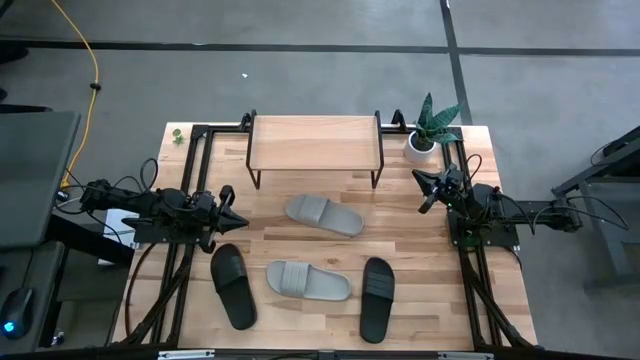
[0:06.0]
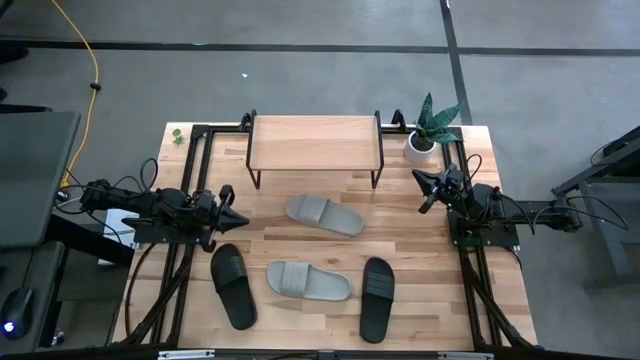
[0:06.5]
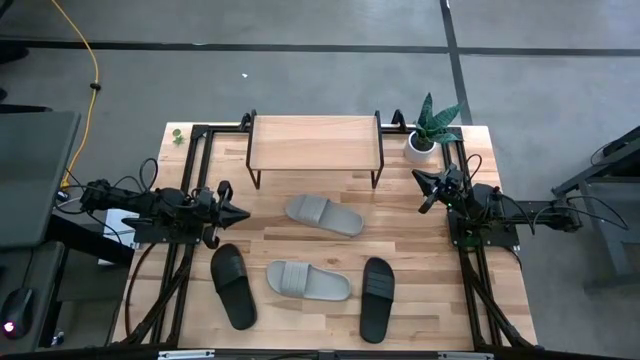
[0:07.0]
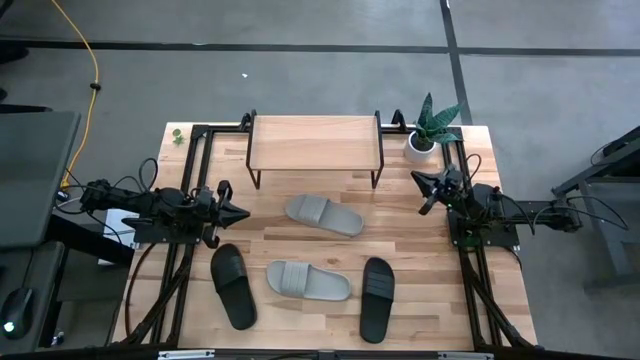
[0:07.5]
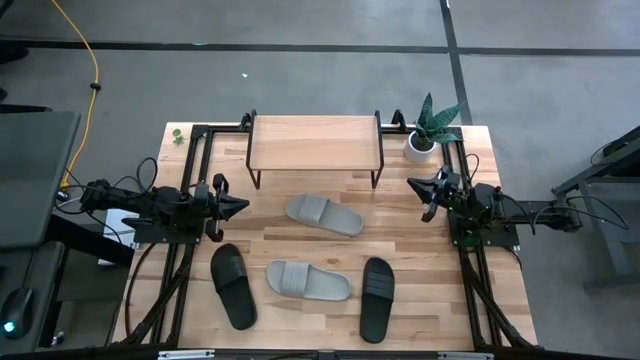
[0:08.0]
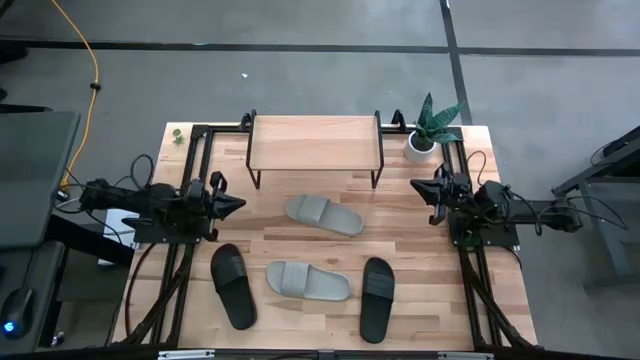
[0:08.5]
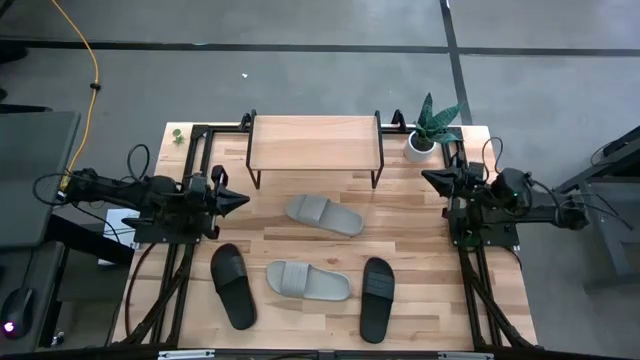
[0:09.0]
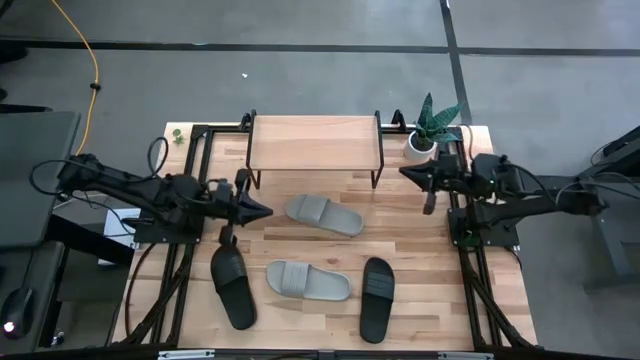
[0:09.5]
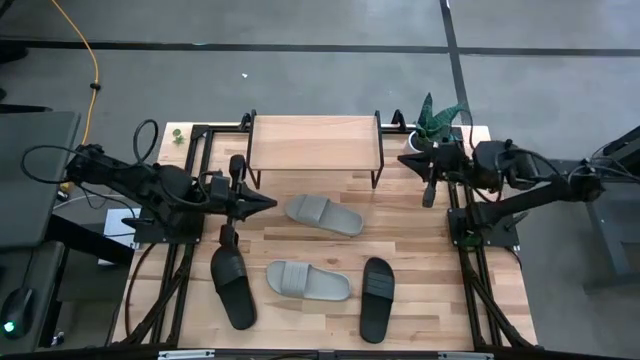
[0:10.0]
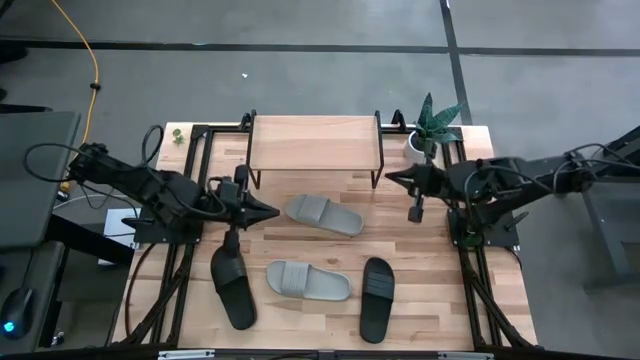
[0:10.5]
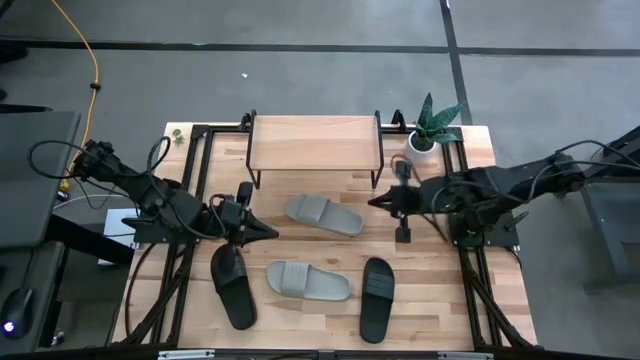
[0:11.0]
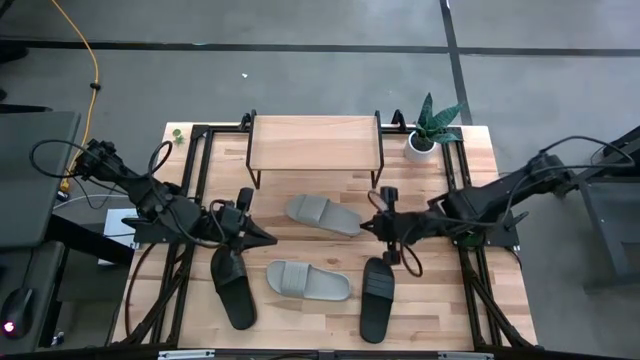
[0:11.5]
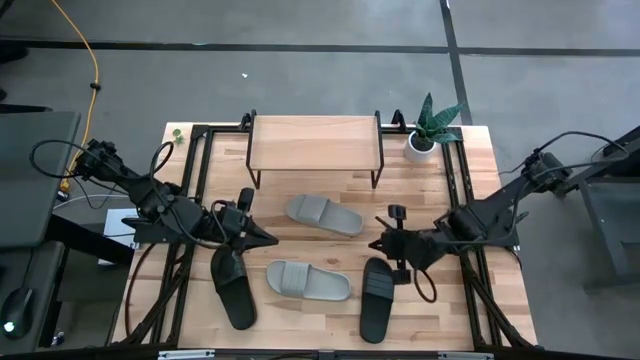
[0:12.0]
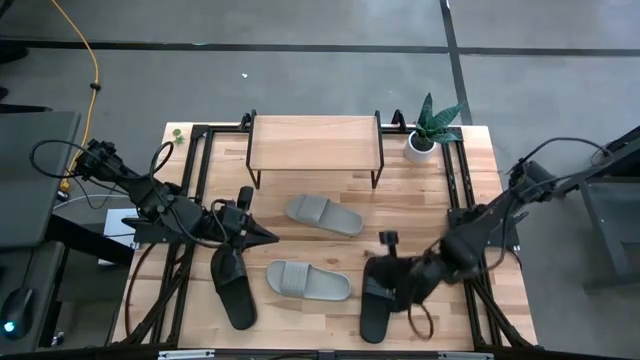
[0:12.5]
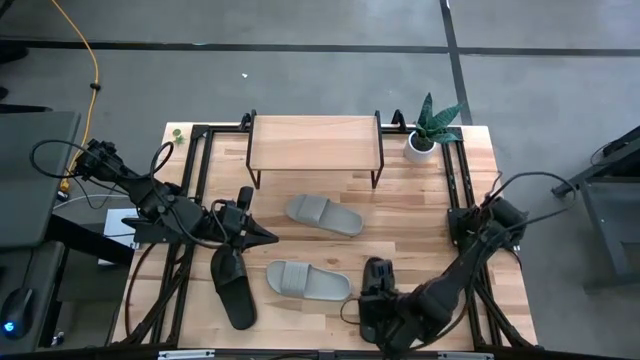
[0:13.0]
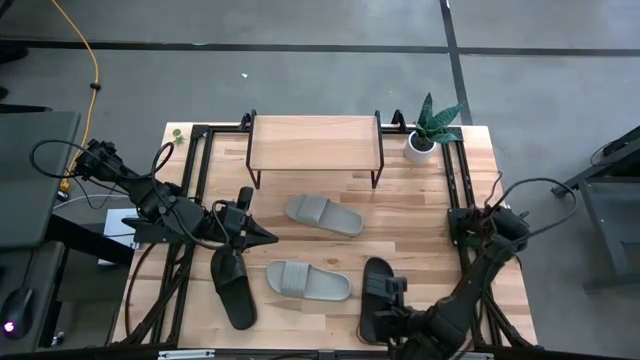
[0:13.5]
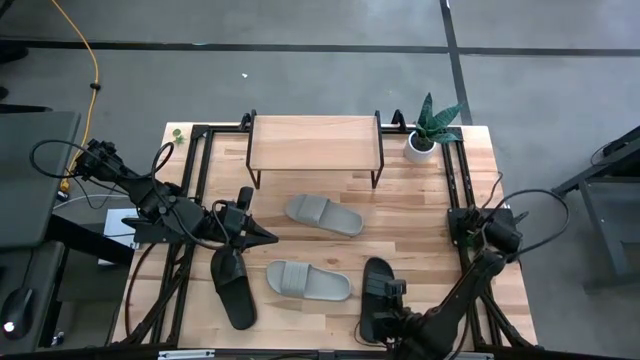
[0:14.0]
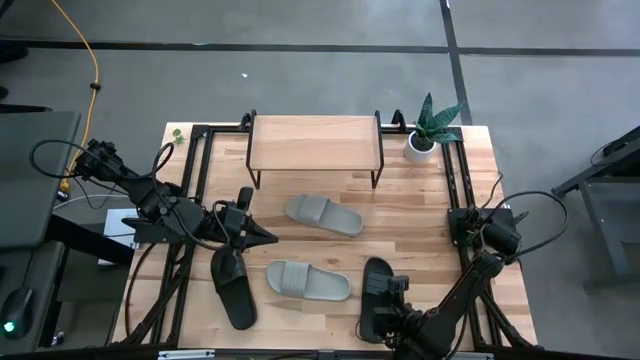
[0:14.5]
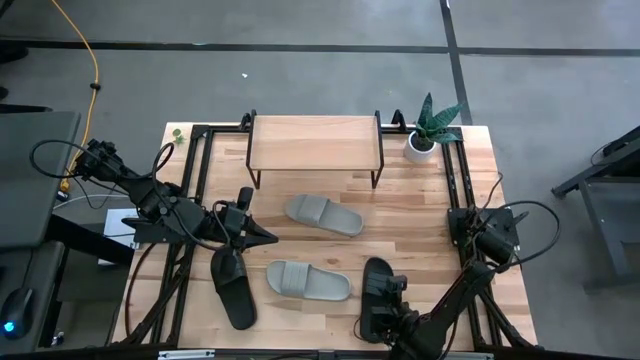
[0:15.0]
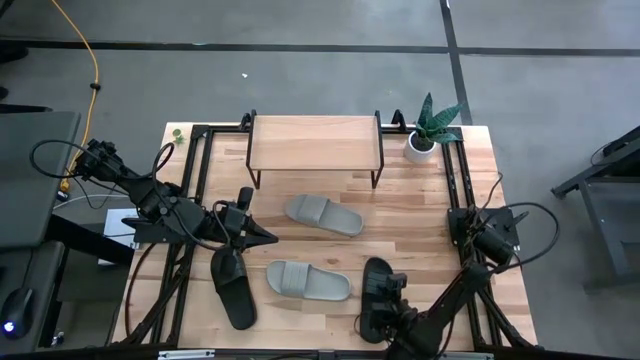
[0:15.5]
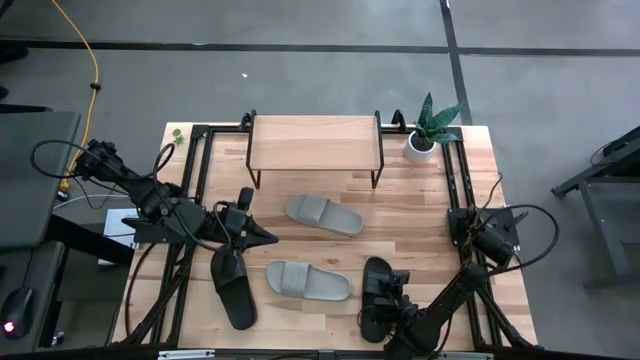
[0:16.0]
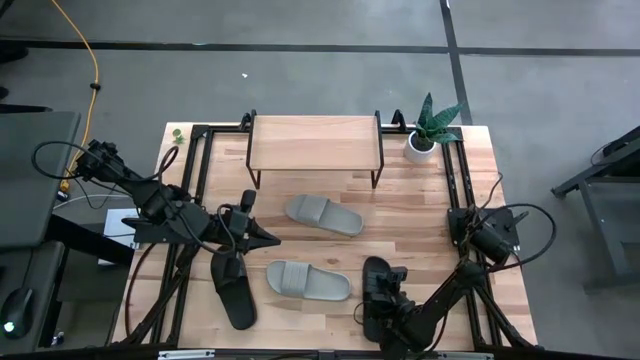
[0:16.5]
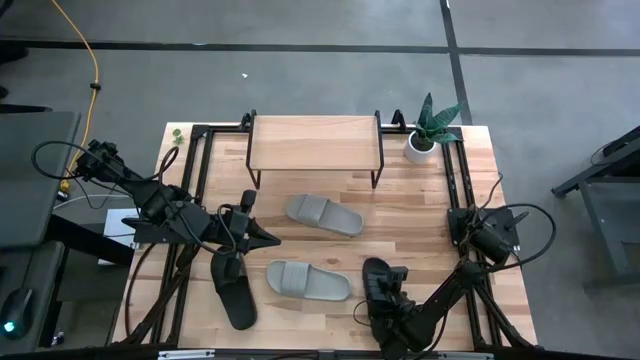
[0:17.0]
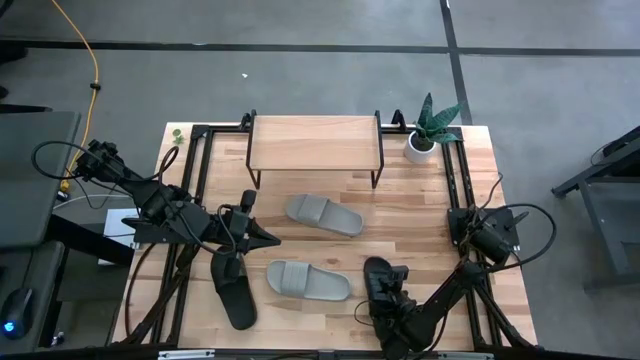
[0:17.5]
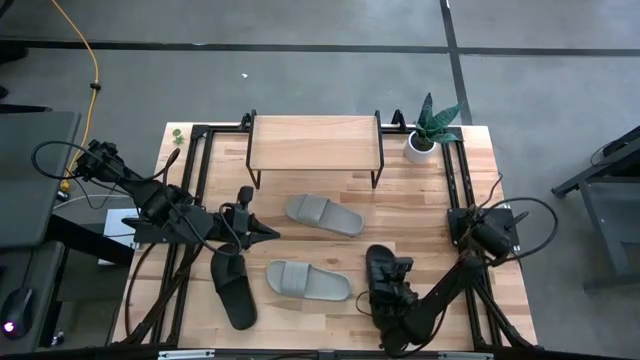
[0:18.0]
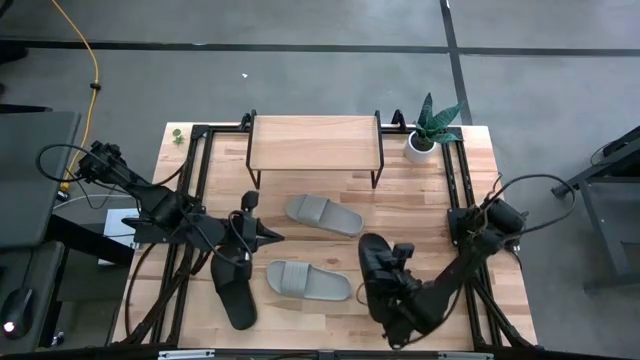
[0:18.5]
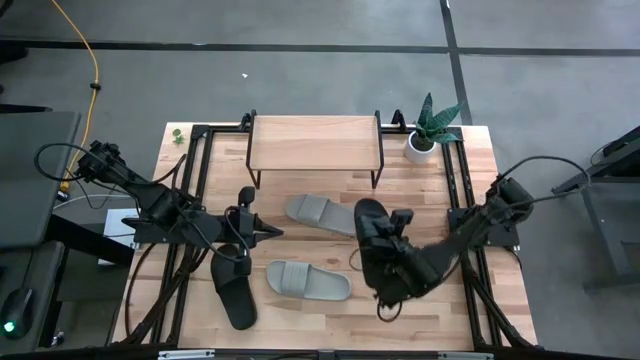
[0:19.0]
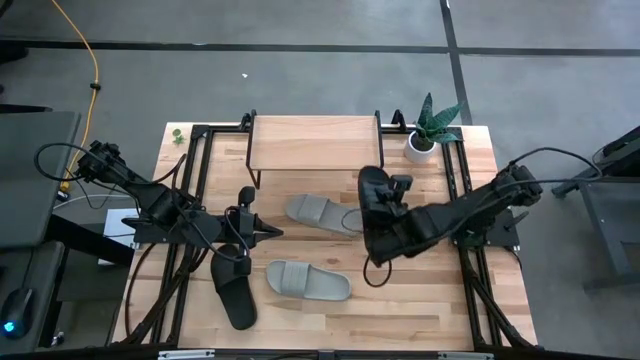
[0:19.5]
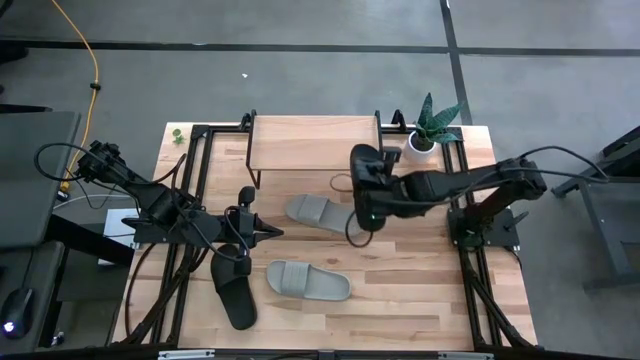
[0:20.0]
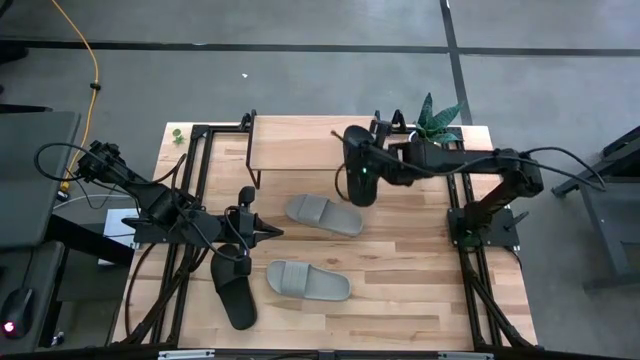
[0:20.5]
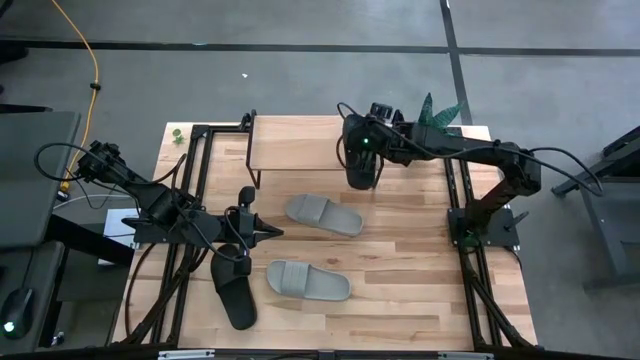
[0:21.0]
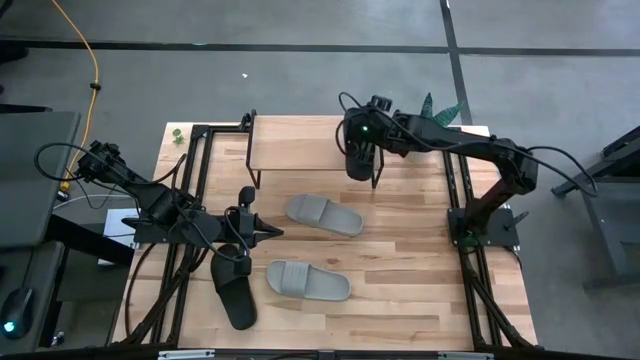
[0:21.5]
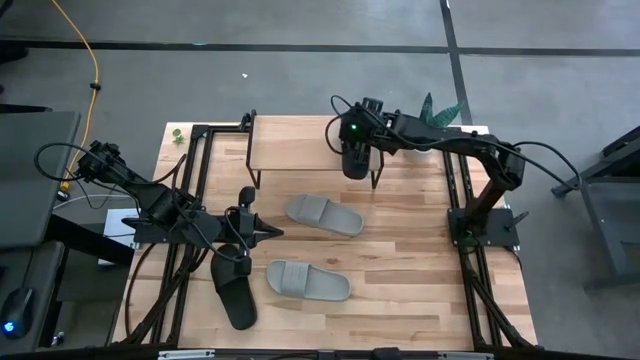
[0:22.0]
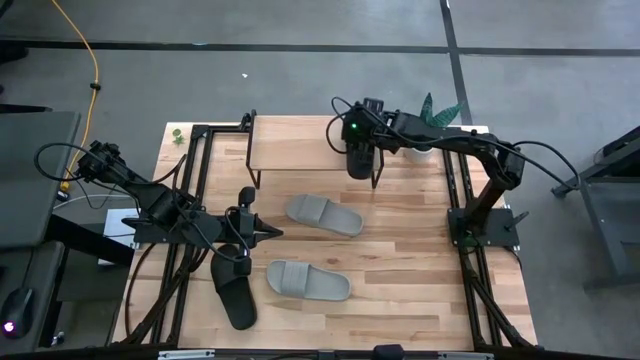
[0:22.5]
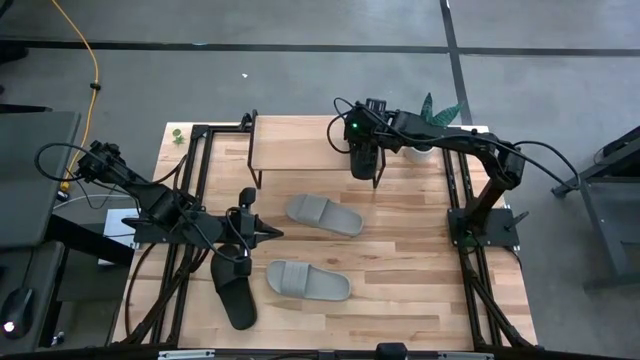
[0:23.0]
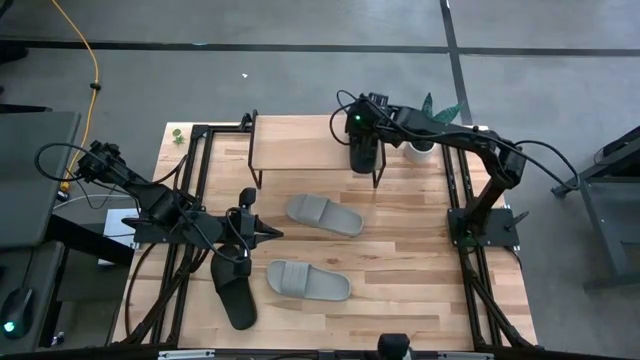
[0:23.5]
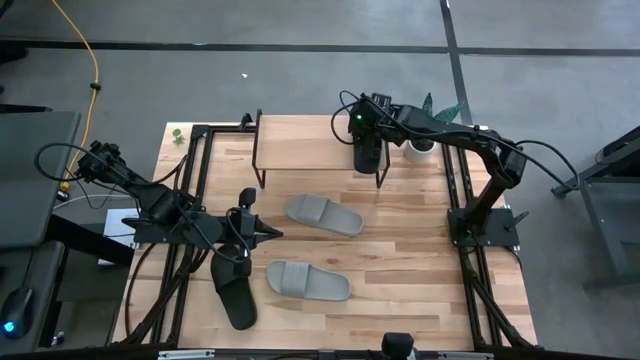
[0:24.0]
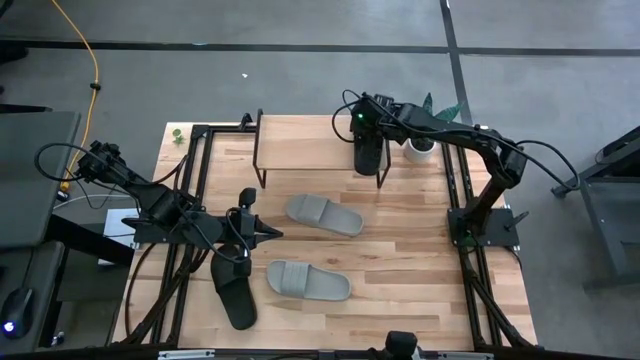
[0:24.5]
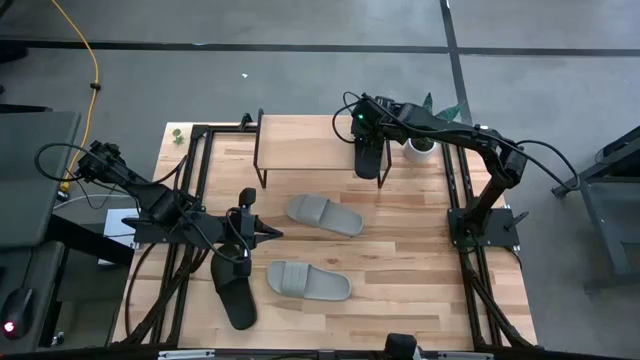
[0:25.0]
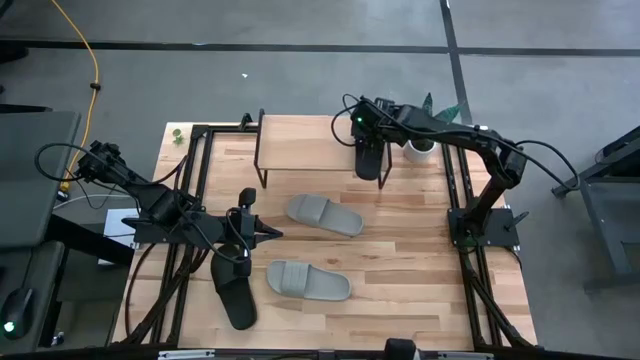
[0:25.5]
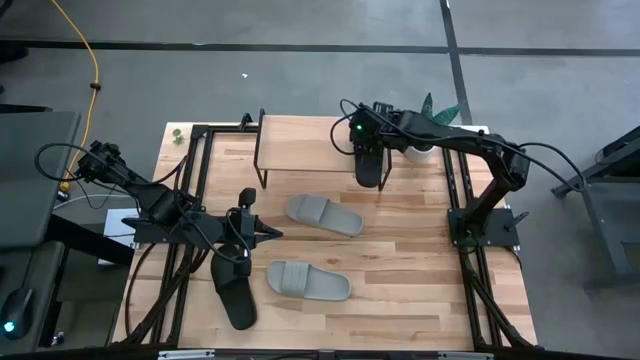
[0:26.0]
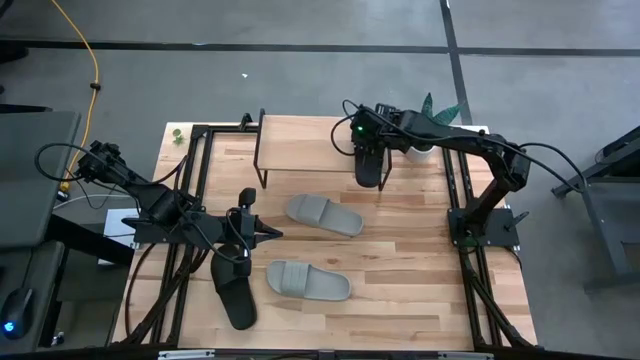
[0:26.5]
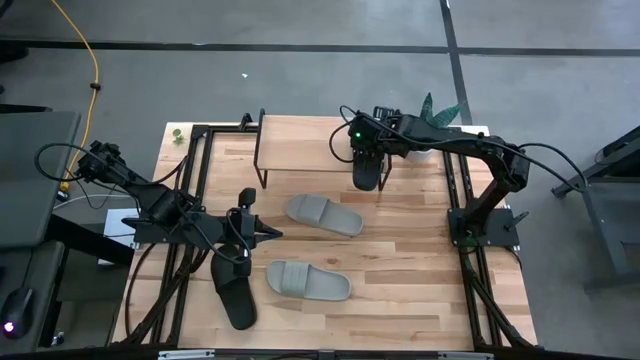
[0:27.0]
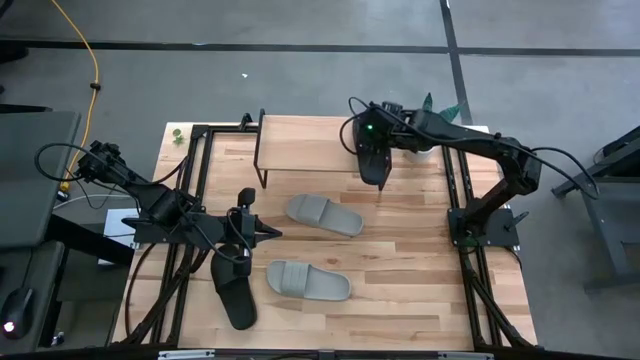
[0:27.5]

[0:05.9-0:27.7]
Task: Pick and place slides into the shelf
Put the right black slide on the shelf
